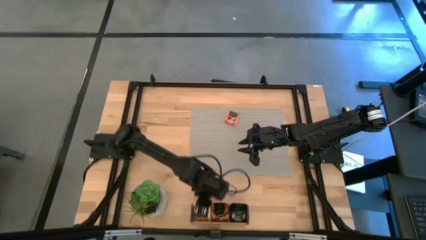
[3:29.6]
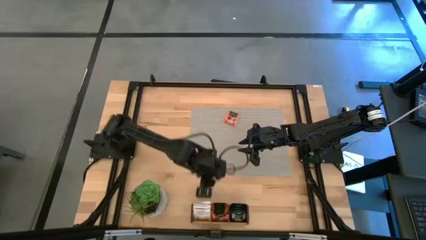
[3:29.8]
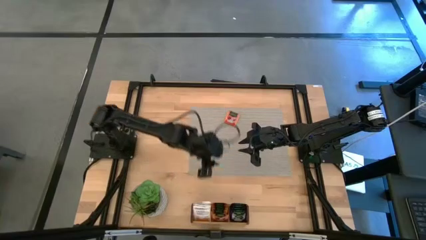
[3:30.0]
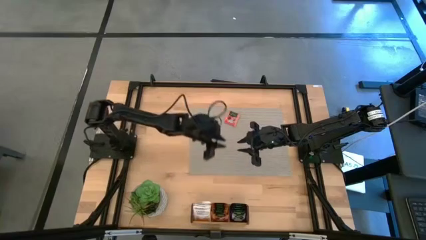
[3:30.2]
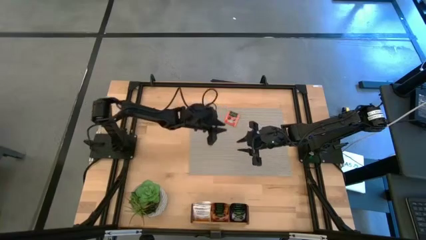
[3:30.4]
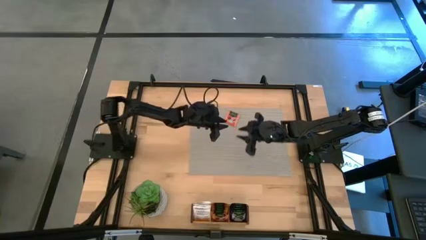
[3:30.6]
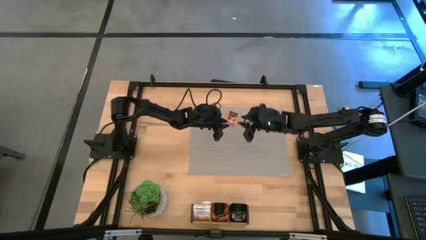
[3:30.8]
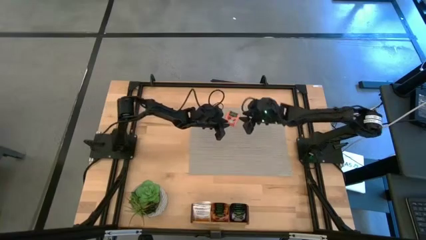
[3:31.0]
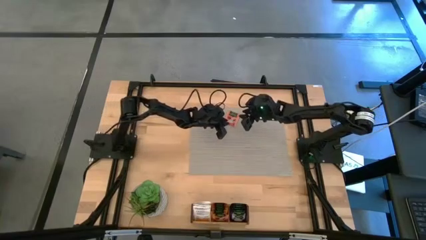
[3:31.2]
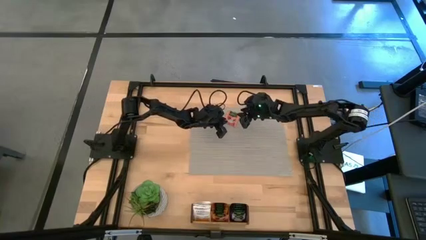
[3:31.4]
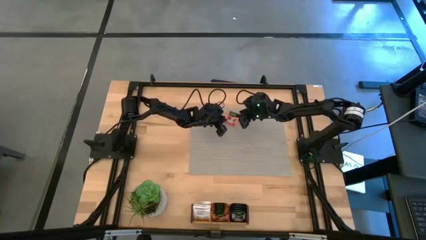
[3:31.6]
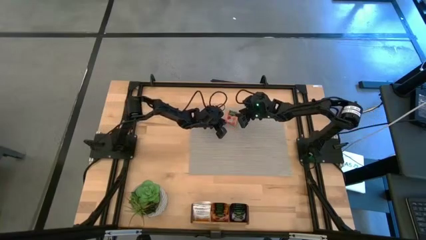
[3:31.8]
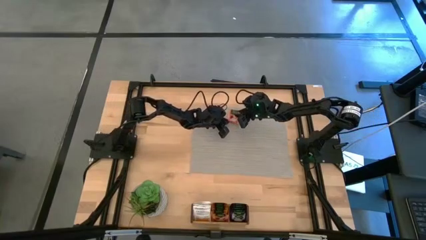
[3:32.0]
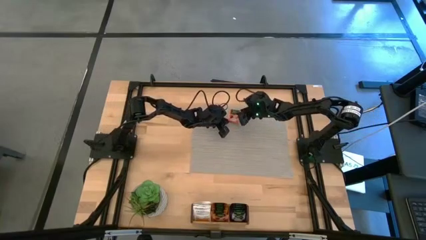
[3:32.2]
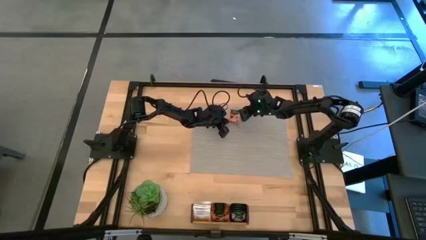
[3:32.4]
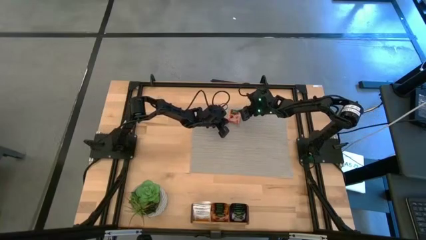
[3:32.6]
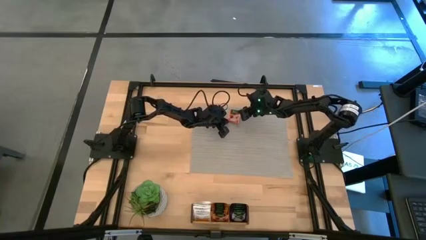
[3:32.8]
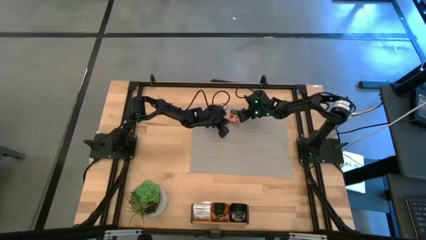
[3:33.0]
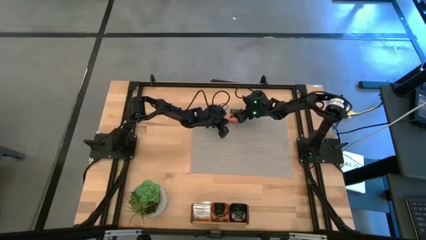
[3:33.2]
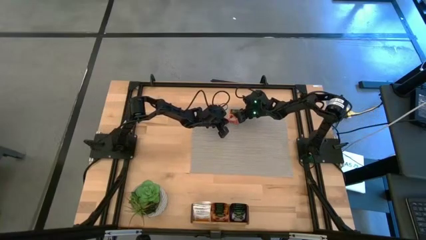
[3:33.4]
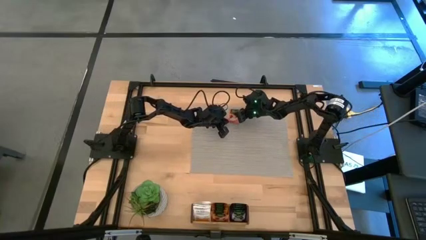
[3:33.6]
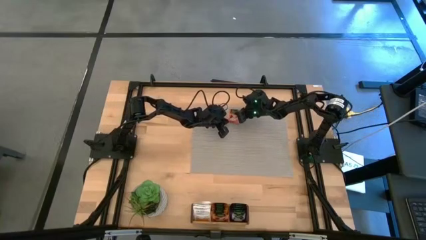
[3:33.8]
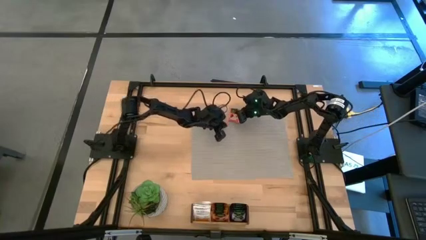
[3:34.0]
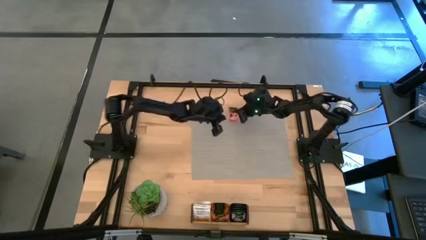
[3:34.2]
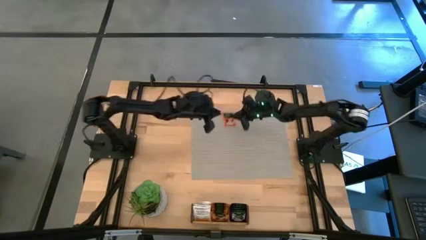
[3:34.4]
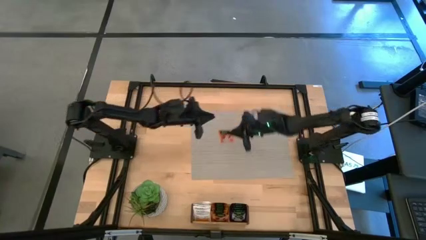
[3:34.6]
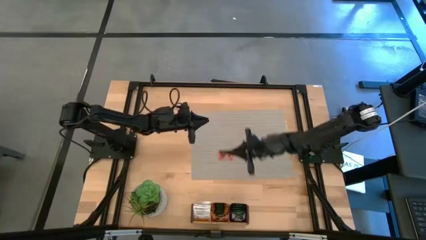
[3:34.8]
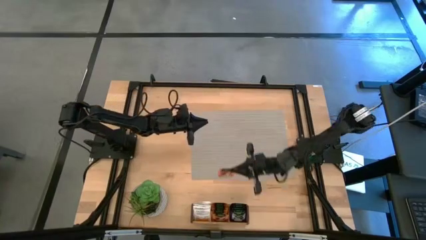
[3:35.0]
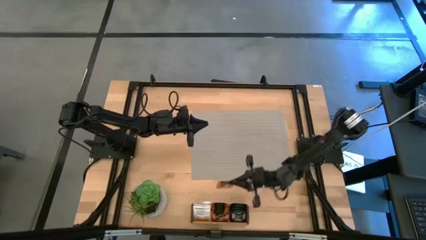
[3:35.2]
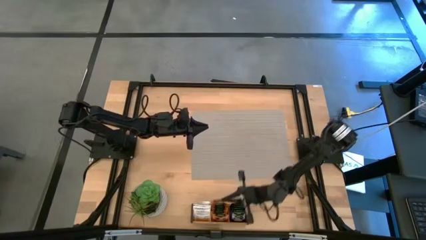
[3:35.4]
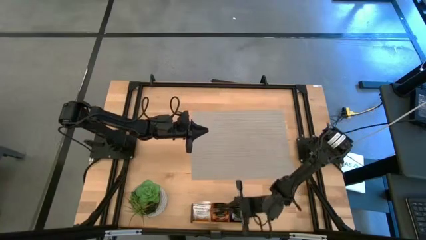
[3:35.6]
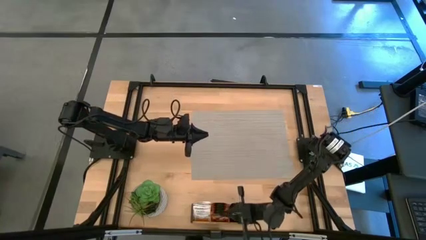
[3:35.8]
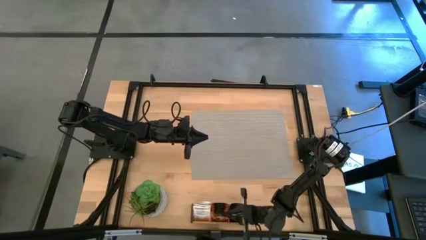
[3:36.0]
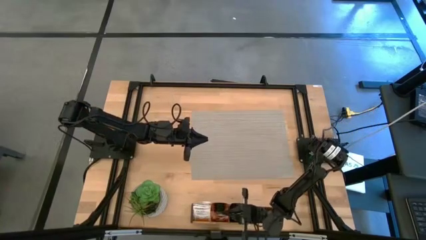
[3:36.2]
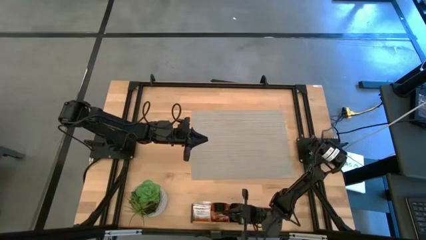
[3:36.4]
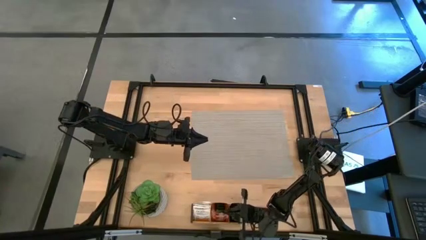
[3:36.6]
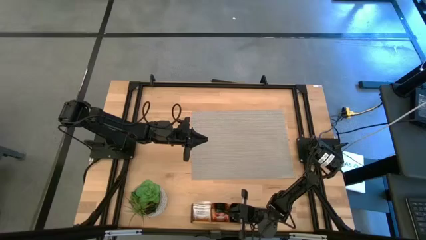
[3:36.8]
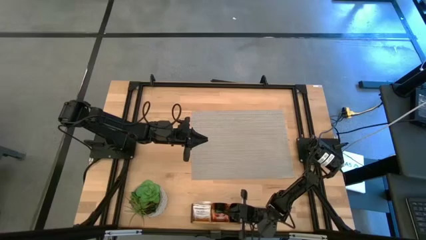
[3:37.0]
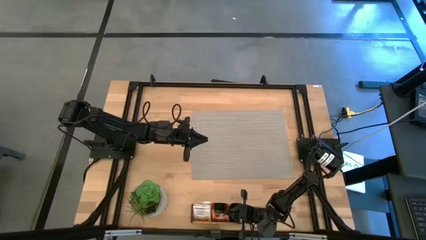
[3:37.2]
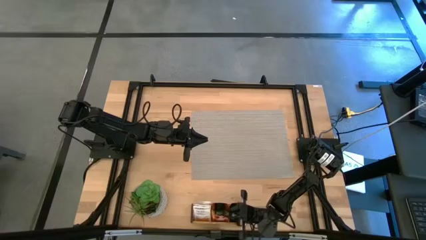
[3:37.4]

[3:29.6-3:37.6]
Task: Pick & Place Tea
Put the orange tea bag into the middle section of the wooden organizer

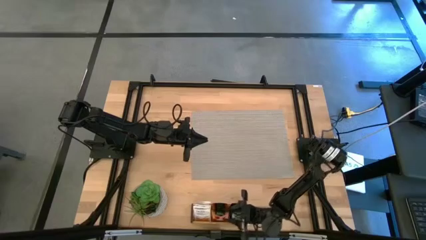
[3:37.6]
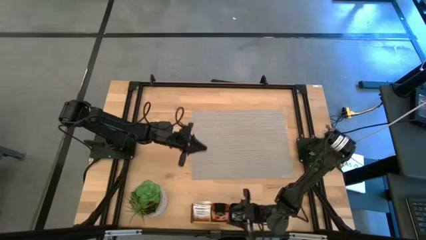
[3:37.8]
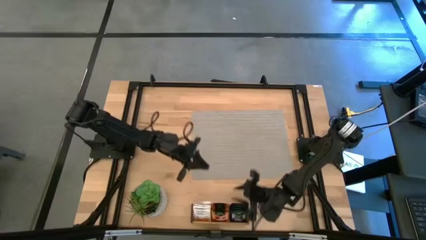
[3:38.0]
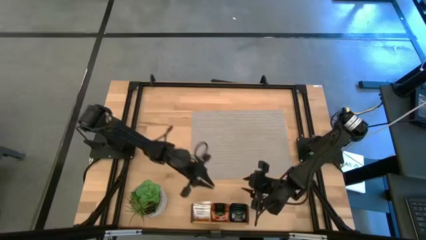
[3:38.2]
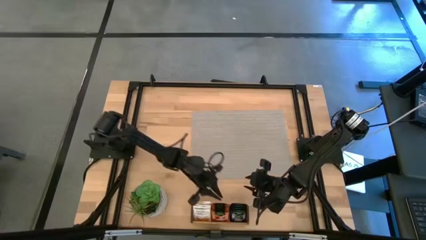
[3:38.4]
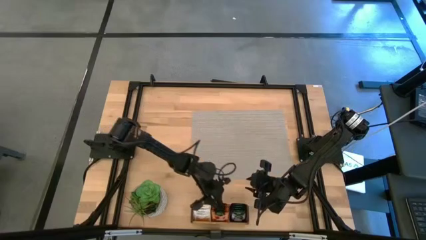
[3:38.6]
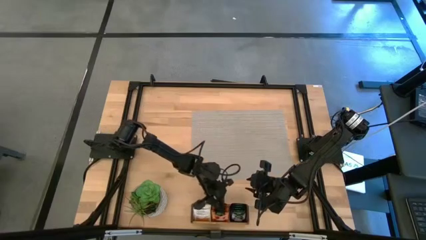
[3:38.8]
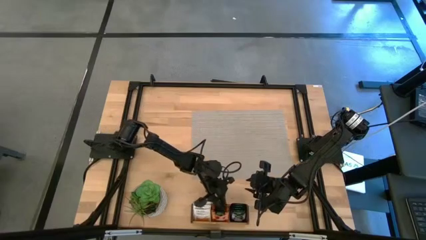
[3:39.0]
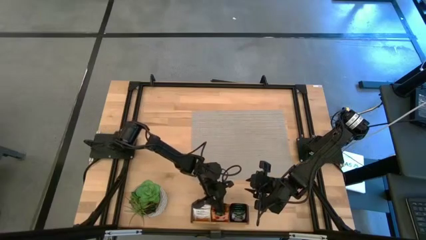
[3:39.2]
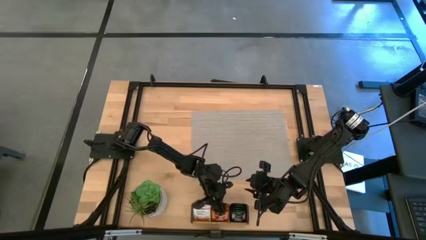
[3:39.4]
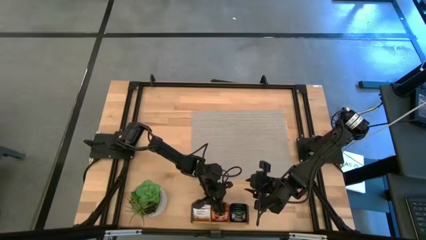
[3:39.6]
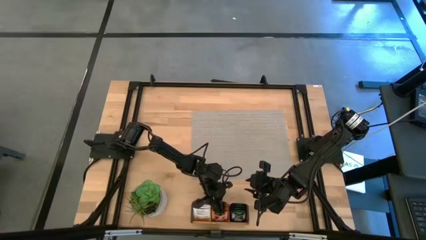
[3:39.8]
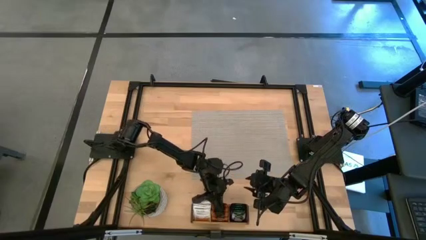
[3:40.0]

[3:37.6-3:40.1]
Adjust the orange tea bags in the middle section of the wooden organizer

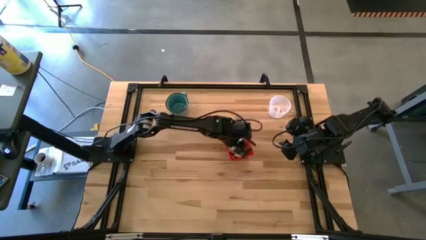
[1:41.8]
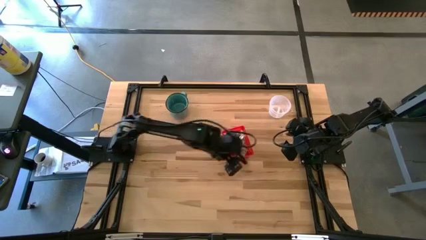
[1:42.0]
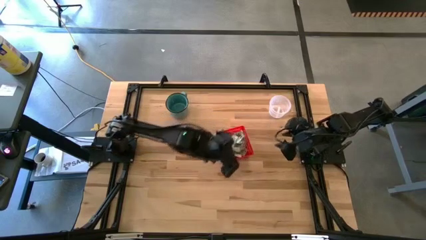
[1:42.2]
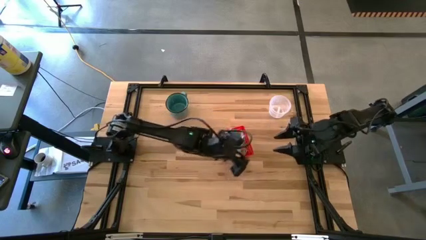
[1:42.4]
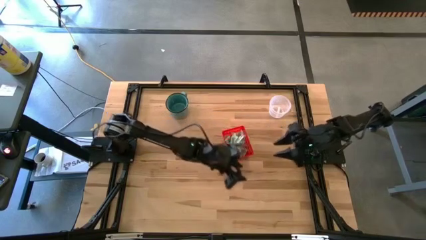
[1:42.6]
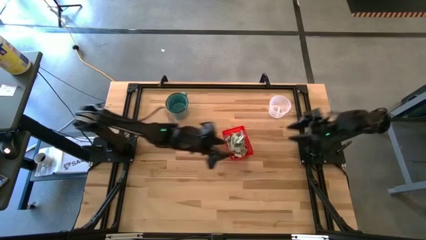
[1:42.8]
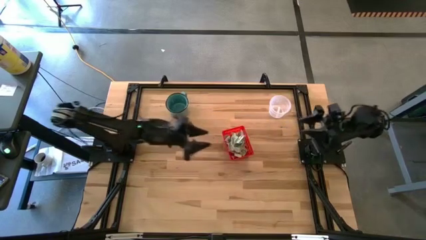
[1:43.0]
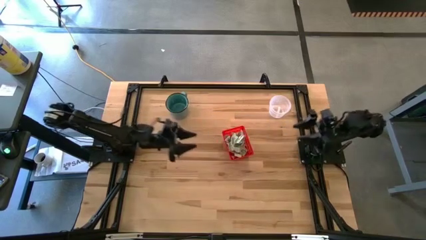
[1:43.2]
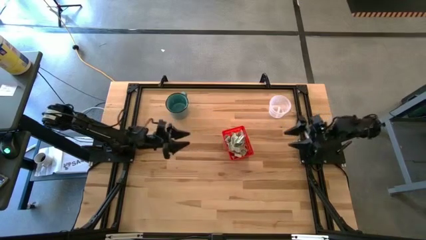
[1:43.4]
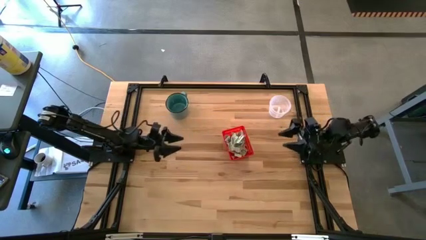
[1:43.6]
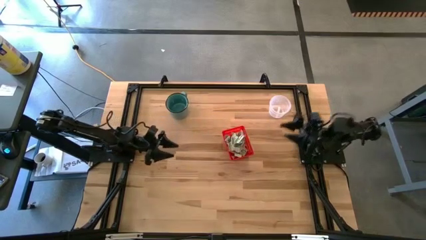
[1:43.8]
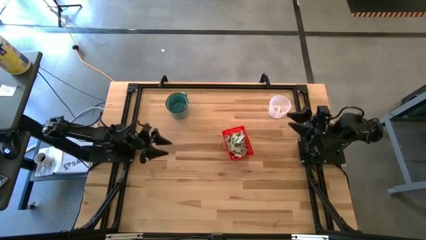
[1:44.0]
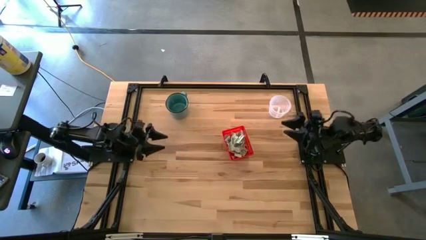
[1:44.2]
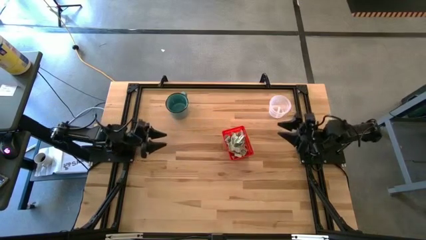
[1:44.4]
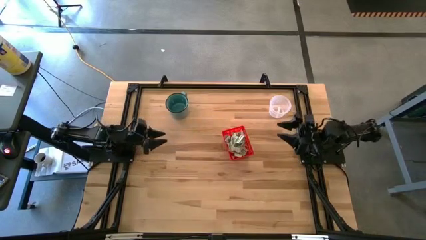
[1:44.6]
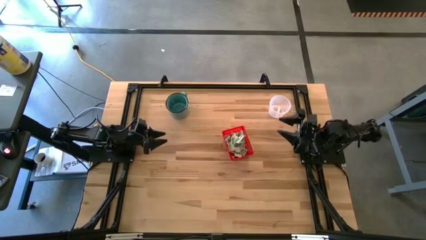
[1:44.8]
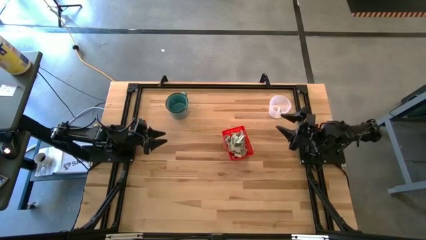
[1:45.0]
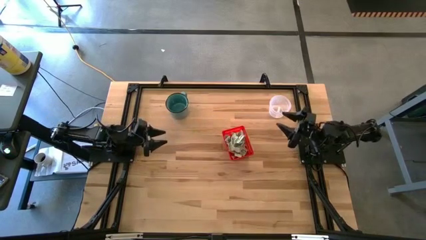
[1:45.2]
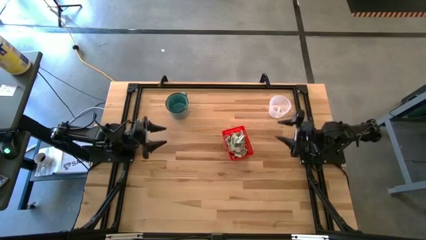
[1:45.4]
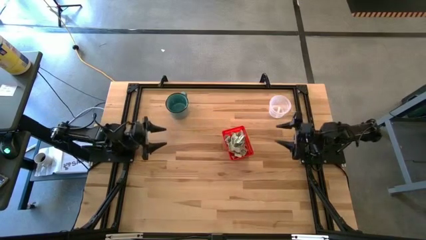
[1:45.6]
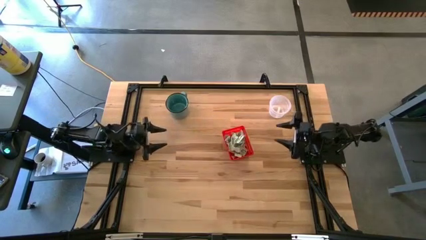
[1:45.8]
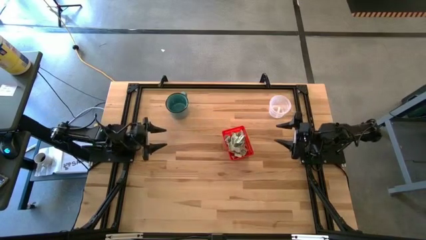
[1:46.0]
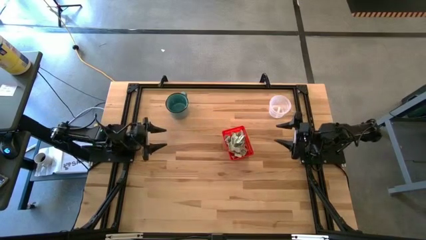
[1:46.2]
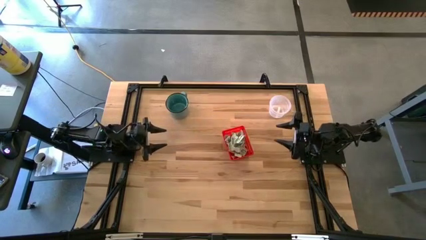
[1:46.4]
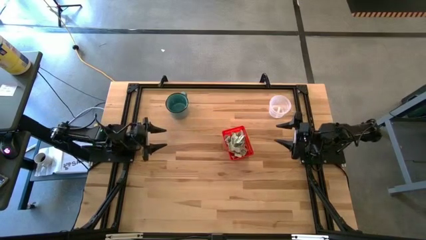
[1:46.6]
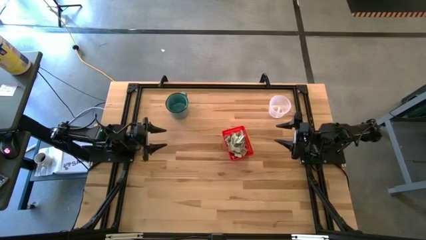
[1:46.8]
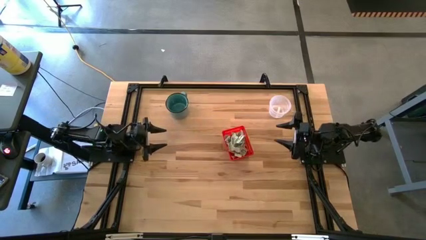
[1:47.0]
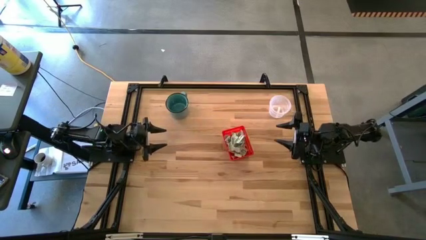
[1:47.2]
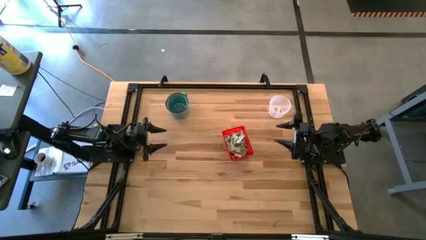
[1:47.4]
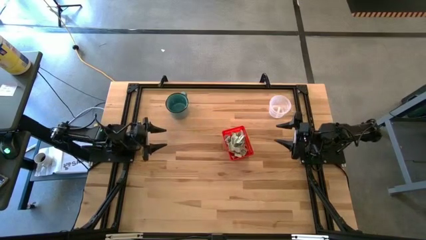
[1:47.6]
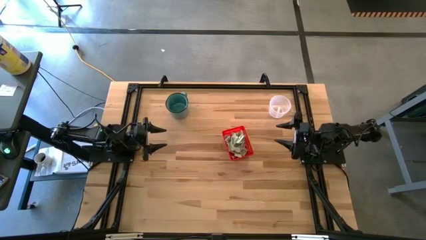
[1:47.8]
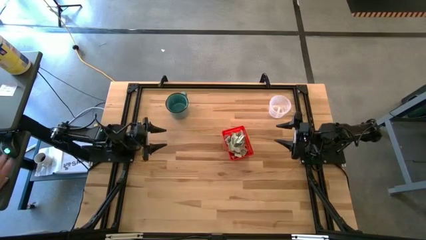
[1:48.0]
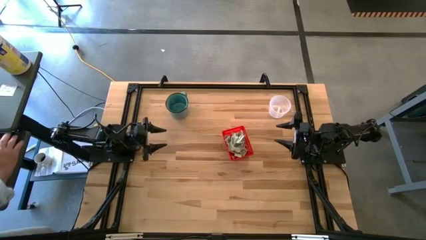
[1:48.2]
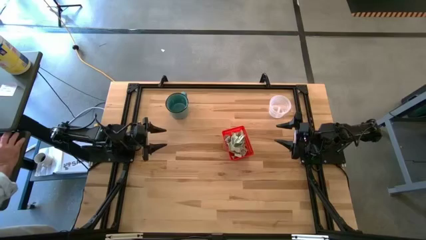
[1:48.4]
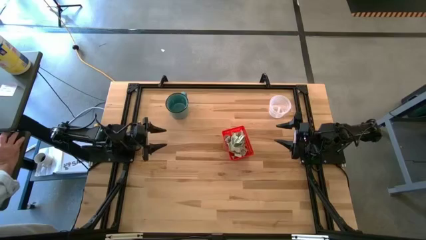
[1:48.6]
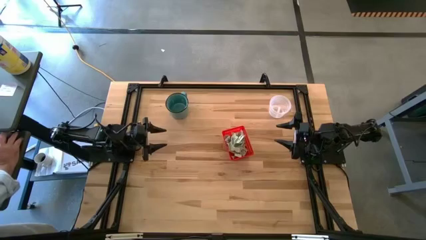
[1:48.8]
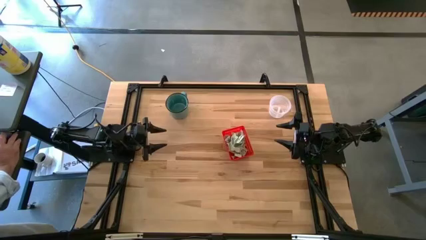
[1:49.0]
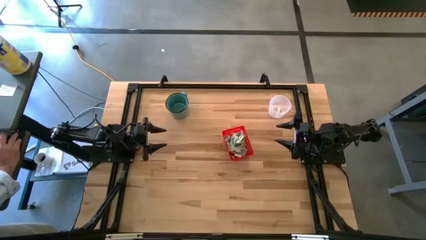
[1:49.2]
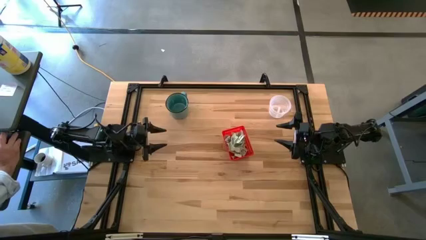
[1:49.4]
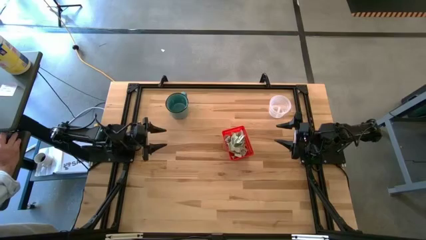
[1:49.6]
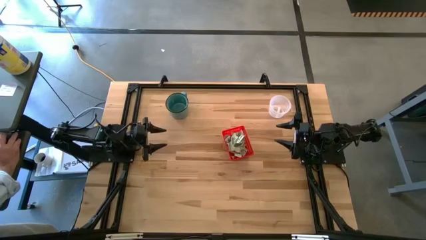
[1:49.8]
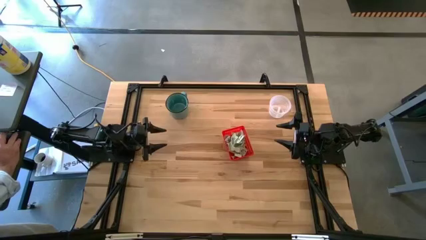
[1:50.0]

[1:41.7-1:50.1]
Task: Pick and place items into bin
Return to Home Position
